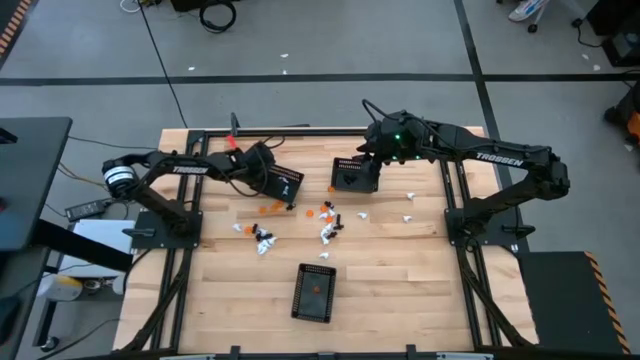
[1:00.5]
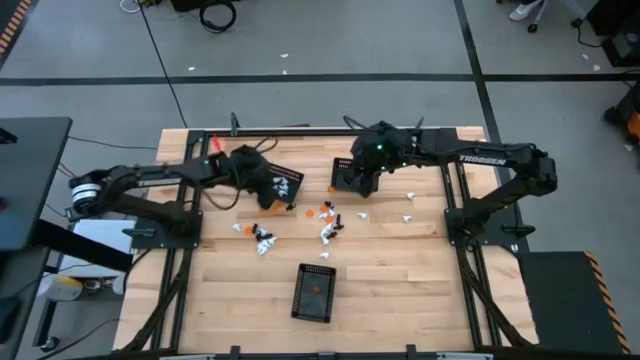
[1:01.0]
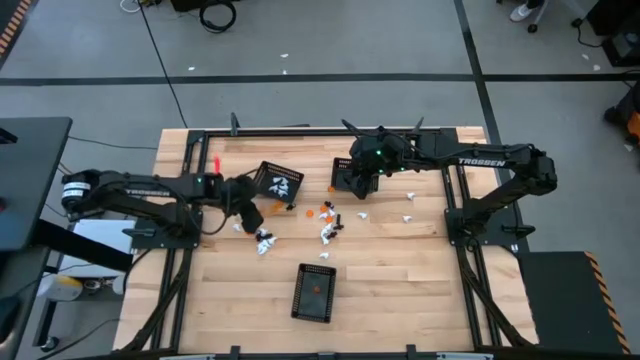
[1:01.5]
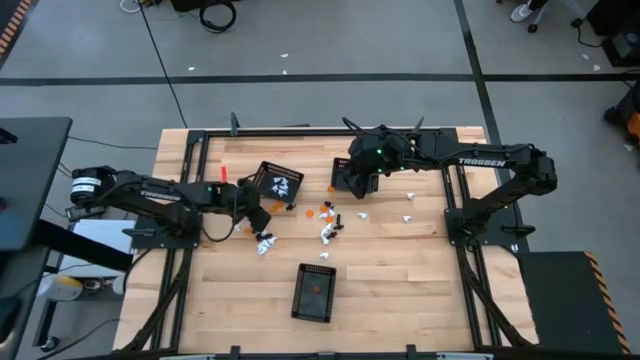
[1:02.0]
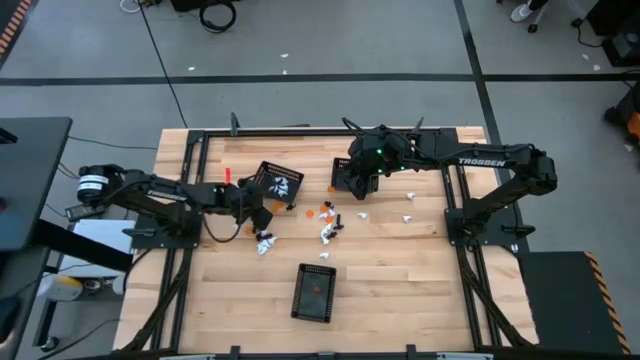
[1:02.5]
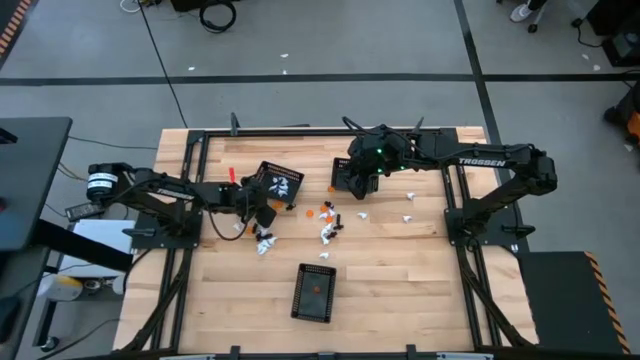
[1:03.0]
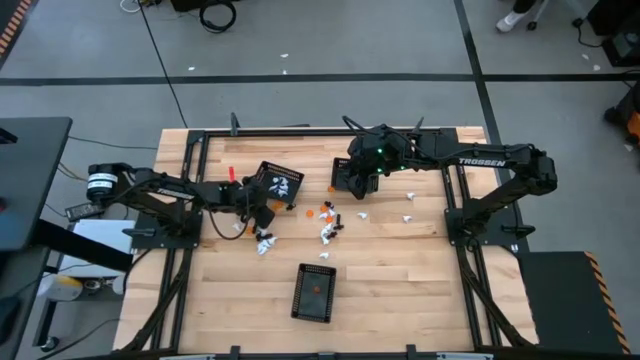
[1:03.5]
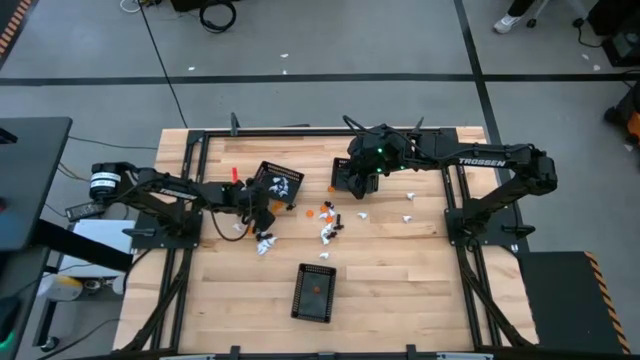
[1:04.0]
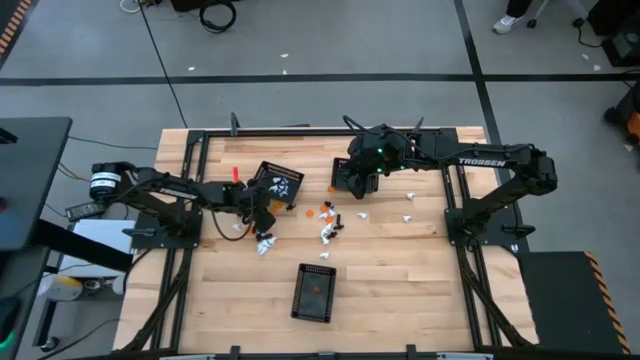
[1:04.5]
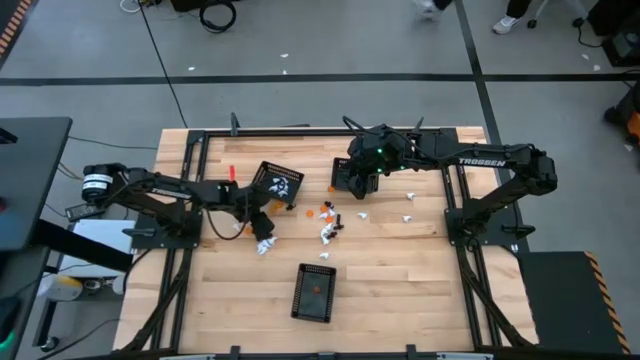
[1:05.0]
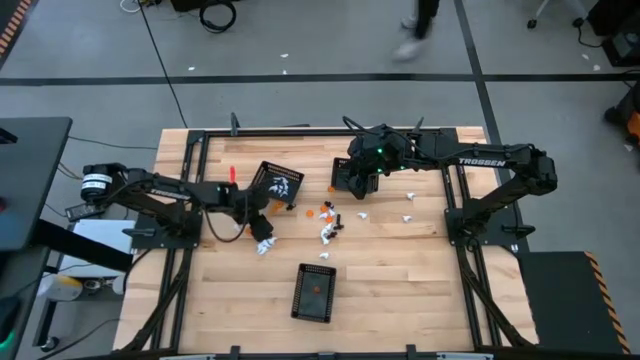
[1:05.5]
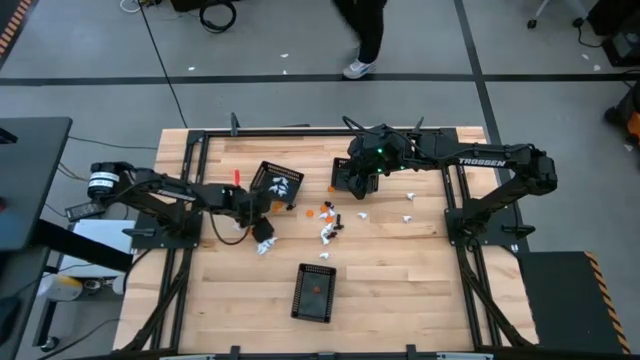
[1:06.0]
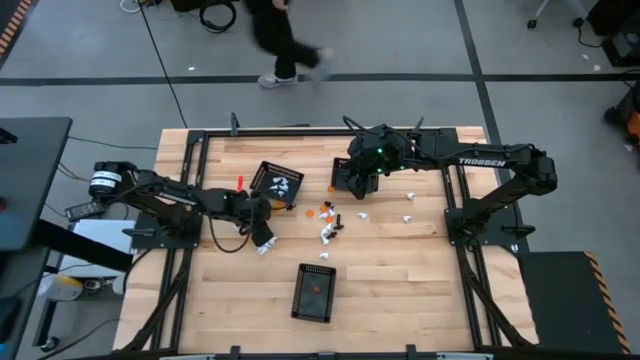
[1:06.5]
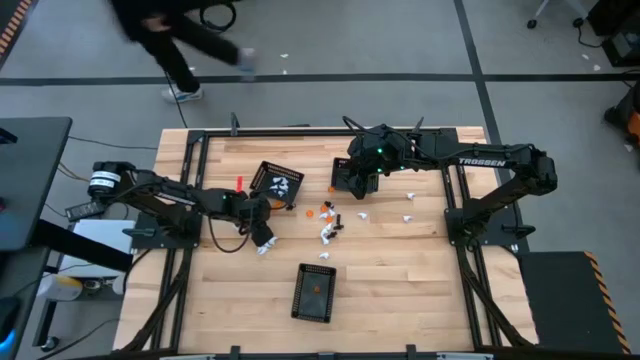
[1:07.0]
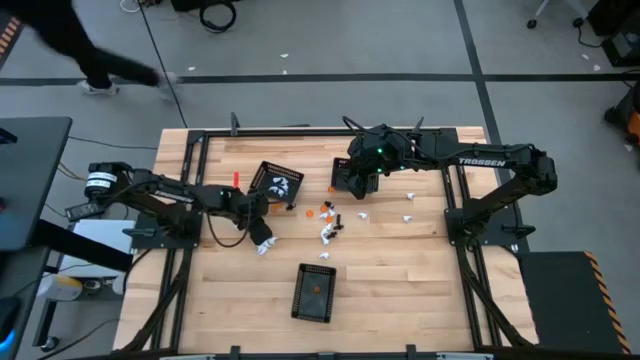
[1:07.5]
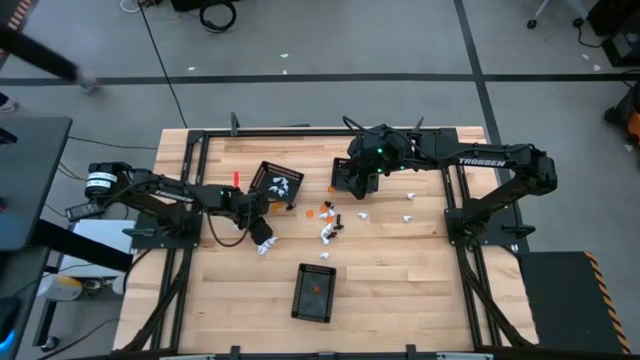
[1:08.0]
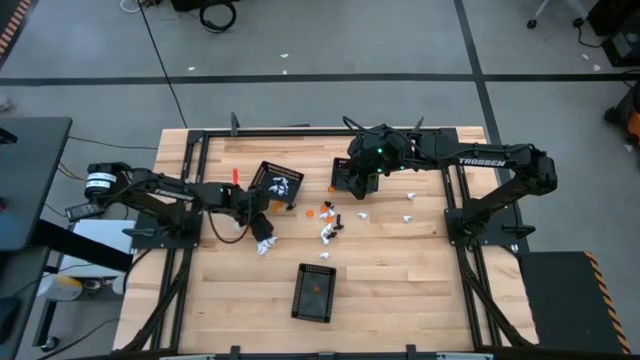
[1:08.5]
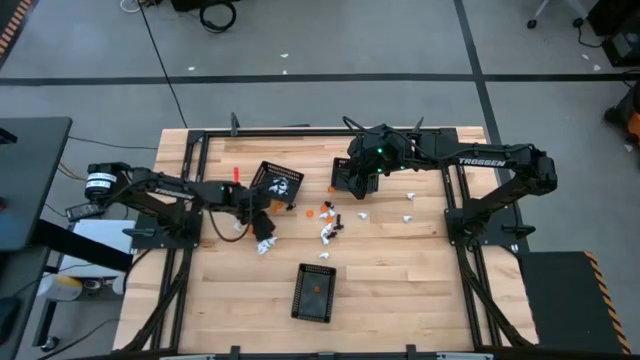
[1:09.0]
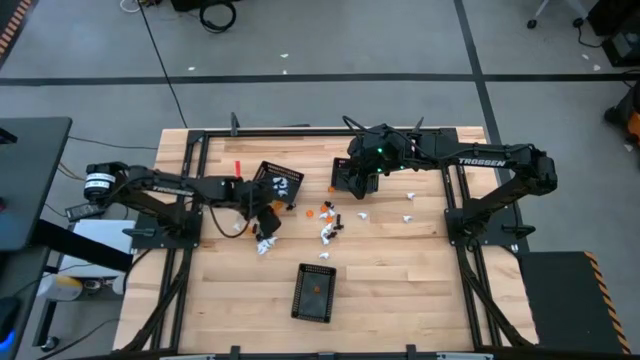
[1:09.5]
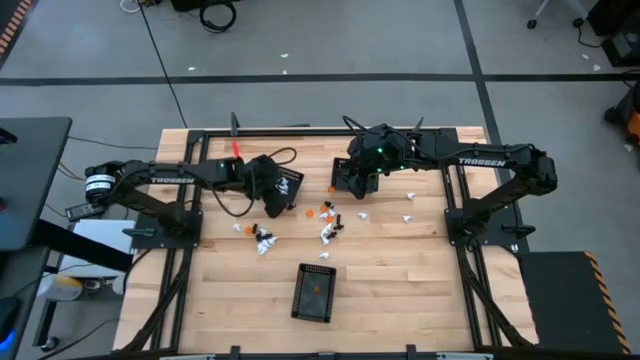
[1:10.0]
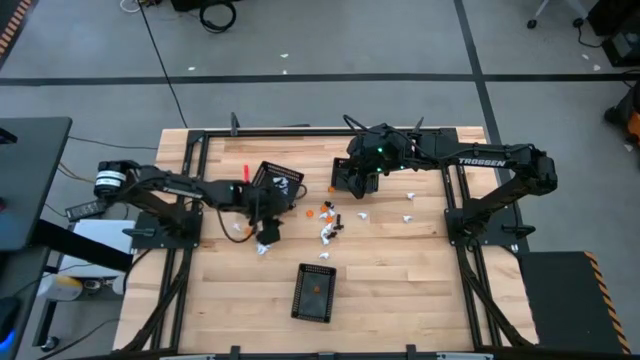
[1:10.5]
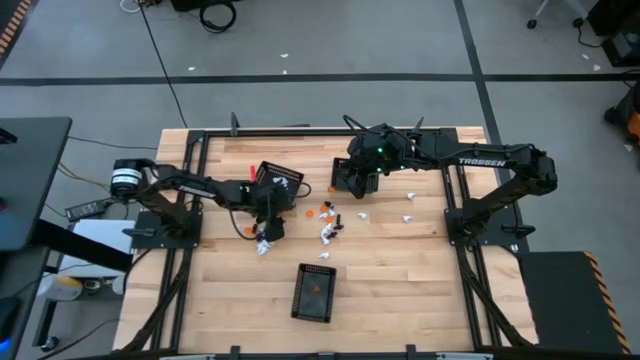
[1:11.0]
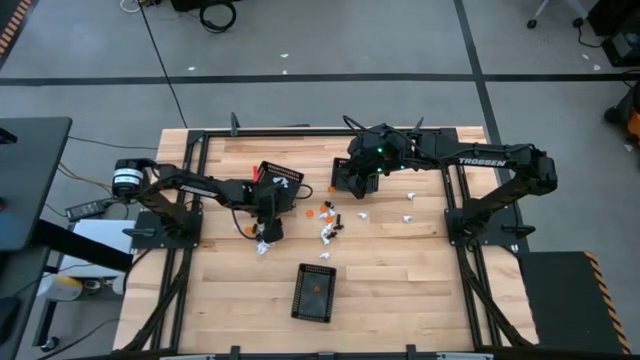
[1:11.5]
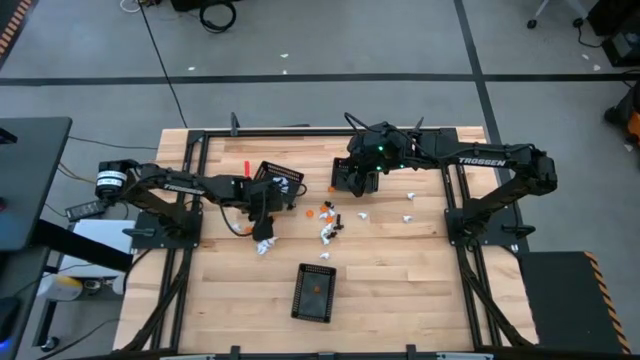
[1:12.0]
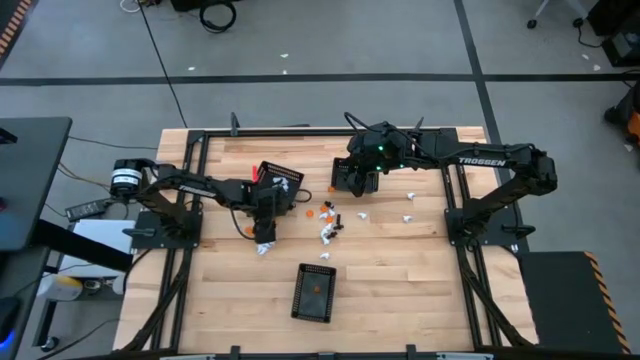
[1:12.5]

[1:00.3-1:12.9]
Task: Sort Halloween decoration
Put the orange pumpkin toy into the bottom black basket

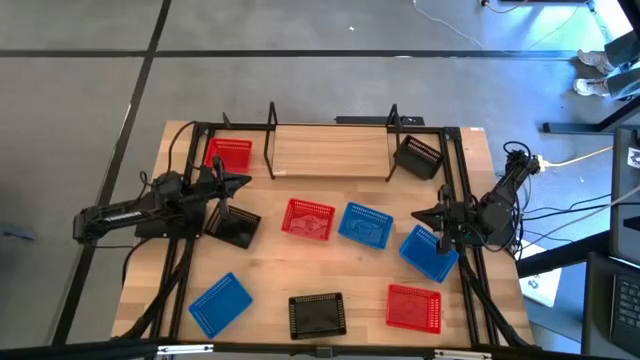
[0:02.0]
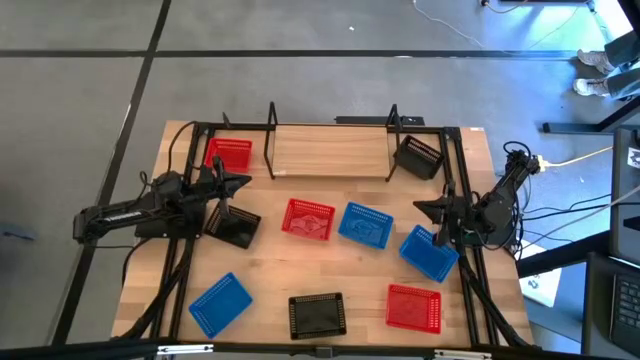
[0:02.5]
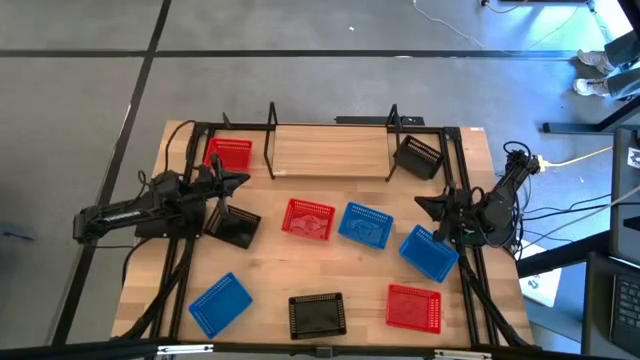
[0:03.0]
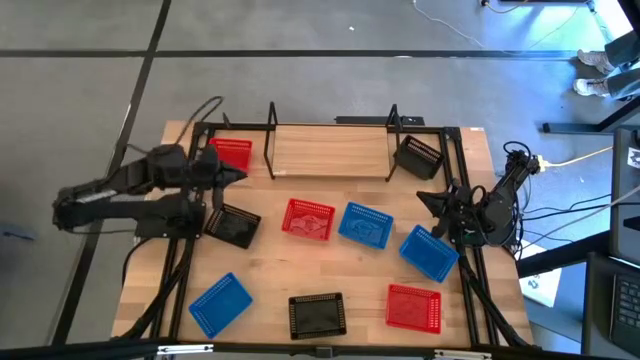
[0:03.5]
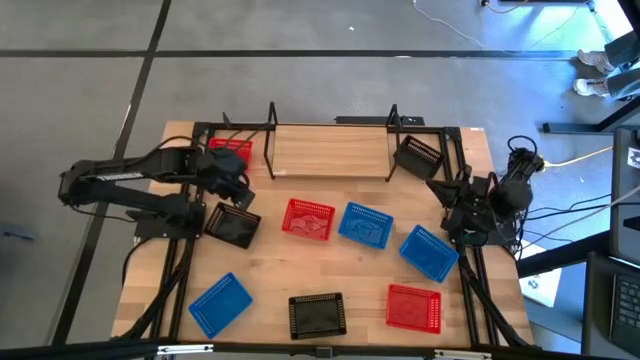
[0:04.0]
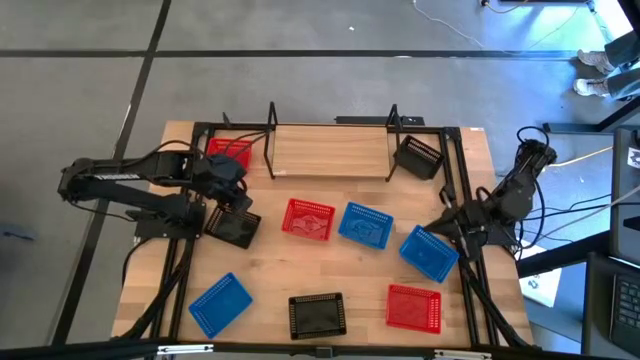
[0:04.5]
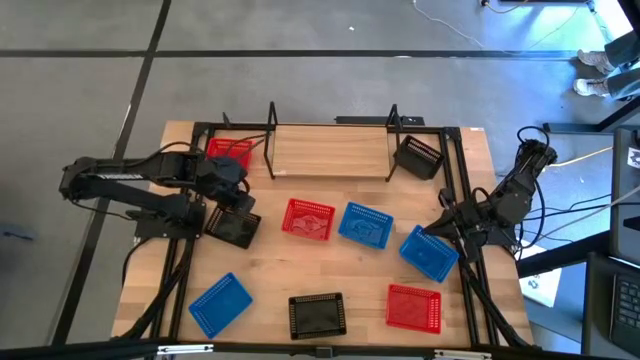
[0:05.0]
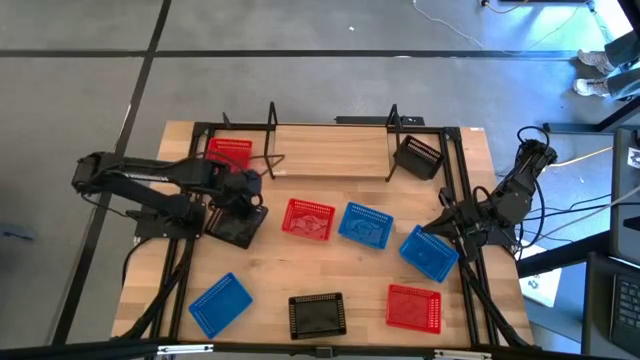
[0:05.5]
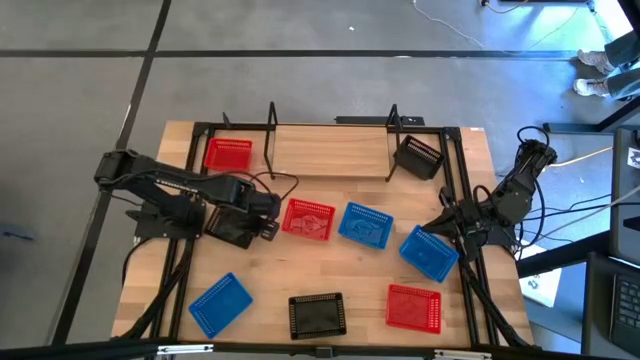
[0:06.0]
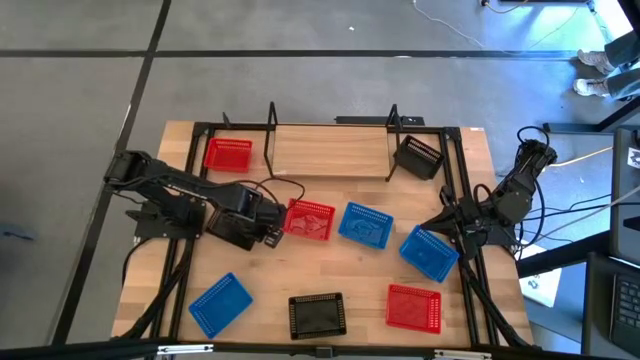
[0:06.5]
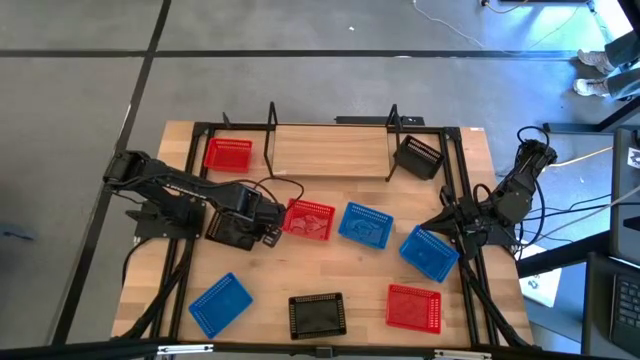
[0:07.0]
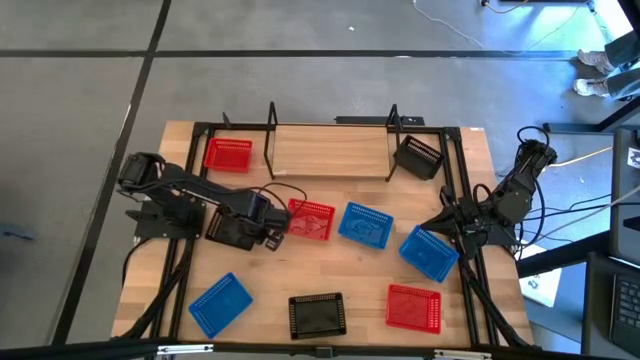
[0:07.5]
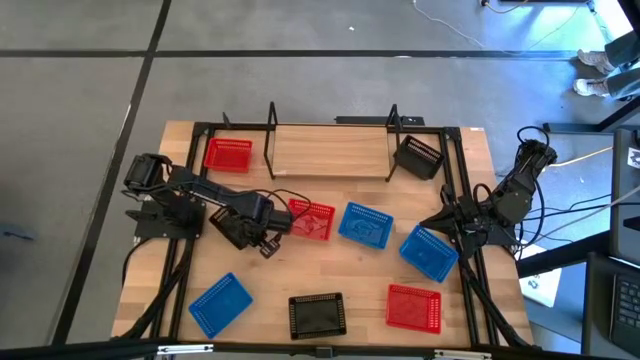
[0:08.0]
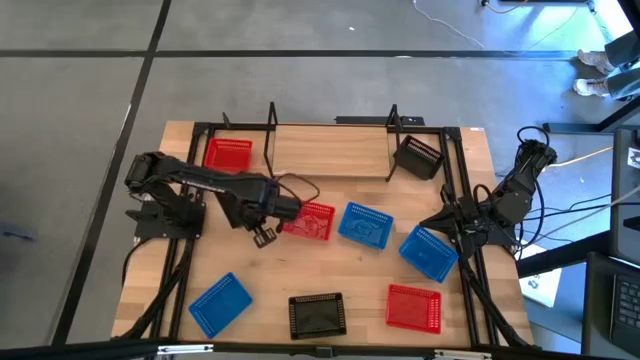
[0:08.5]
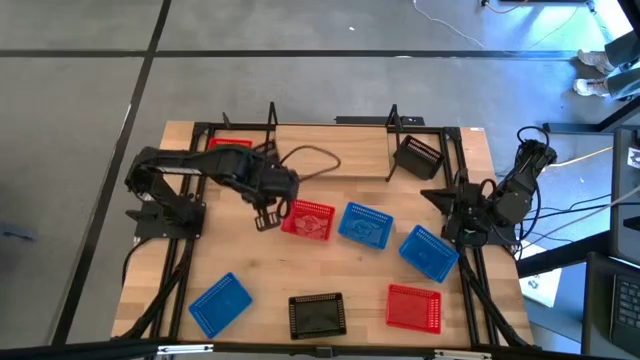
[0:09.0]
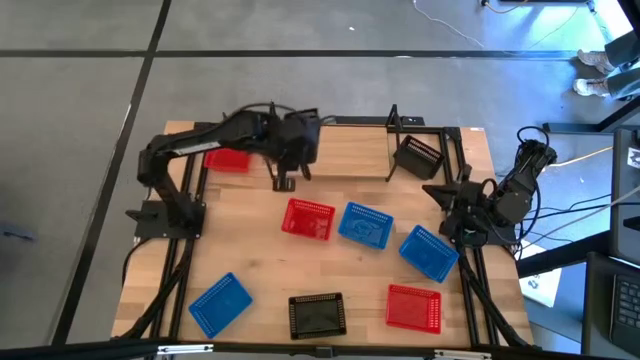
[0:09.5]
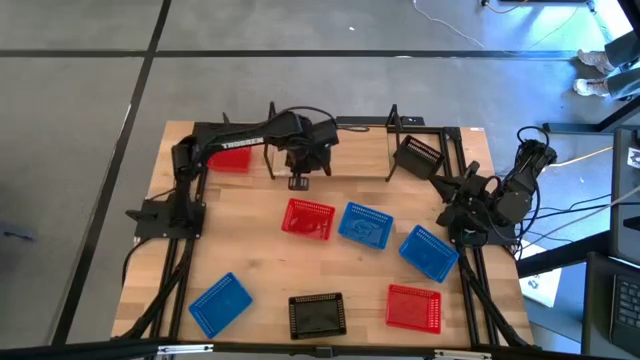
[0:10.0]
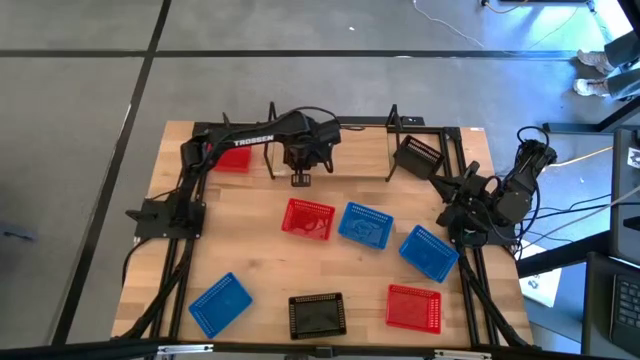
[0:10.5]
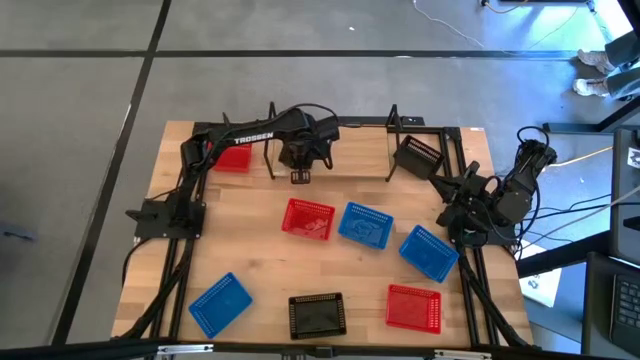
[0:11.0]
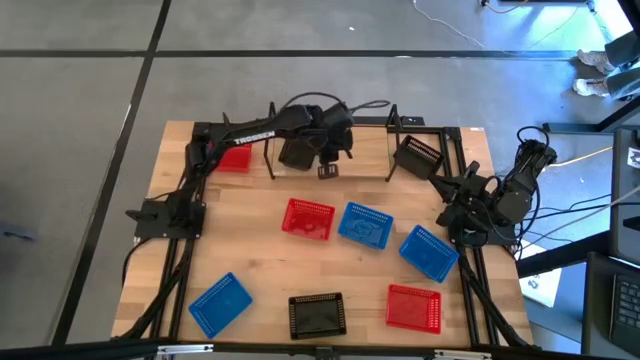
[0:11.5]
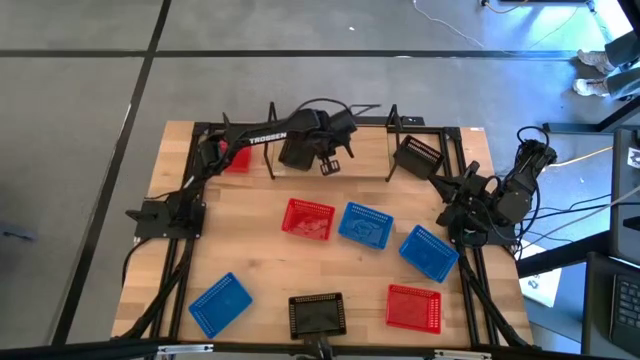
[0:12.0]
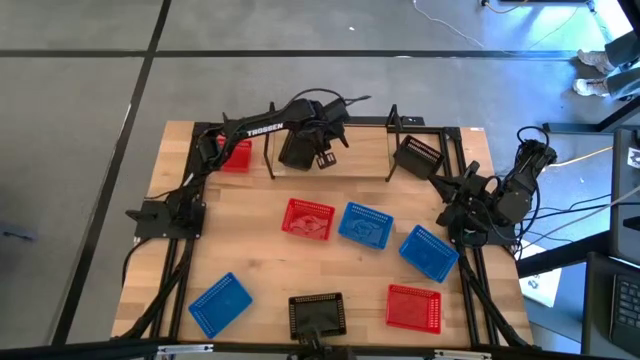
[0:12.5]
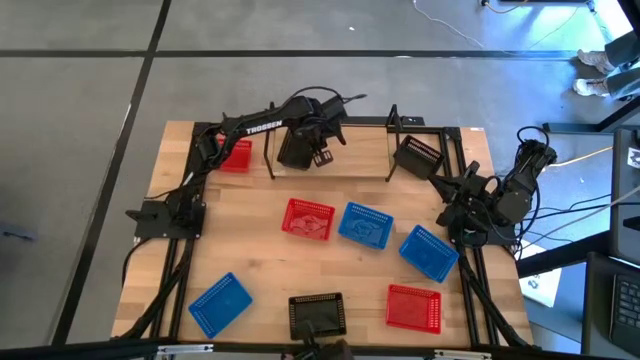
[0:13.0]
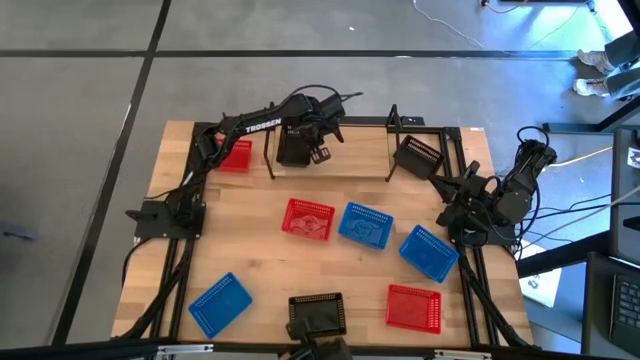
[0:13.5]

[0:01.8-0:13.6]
Task: Stack baskets on shelf by color
Put the left black bin on the shelf
